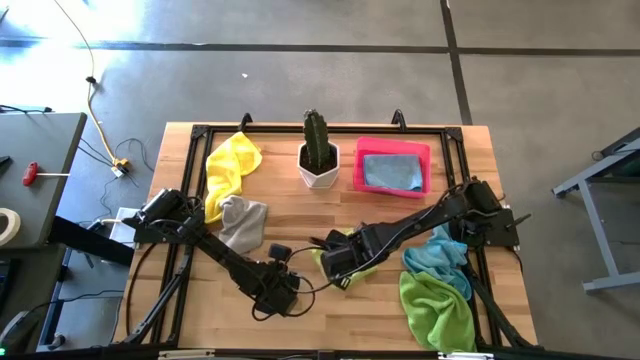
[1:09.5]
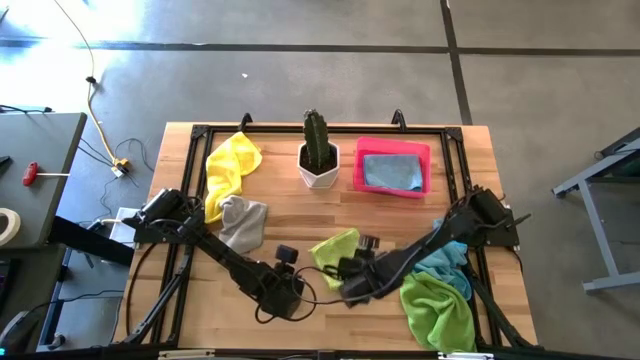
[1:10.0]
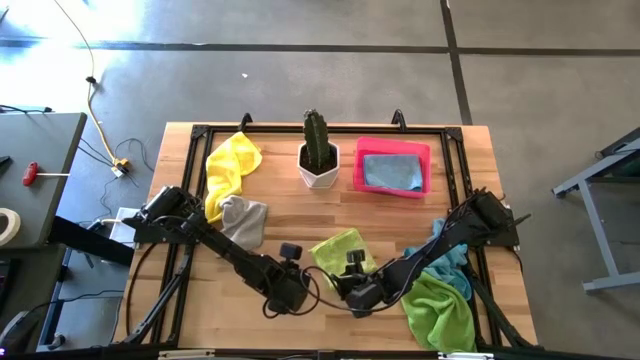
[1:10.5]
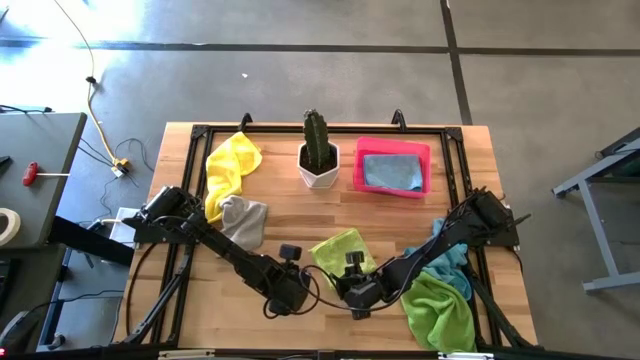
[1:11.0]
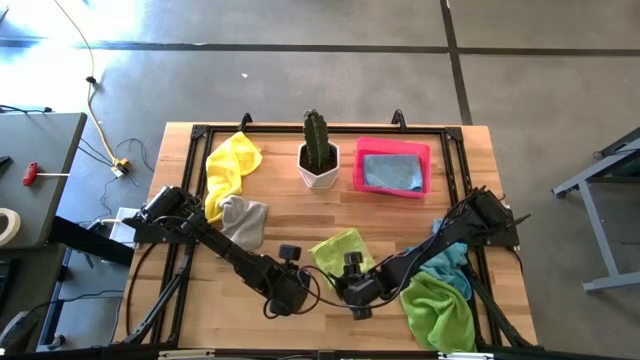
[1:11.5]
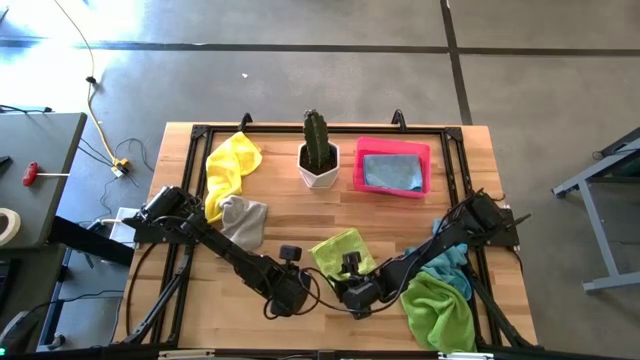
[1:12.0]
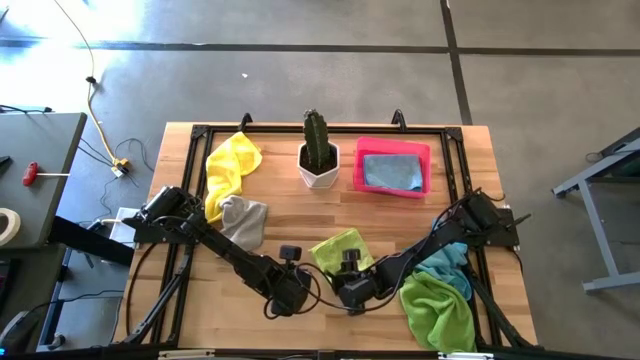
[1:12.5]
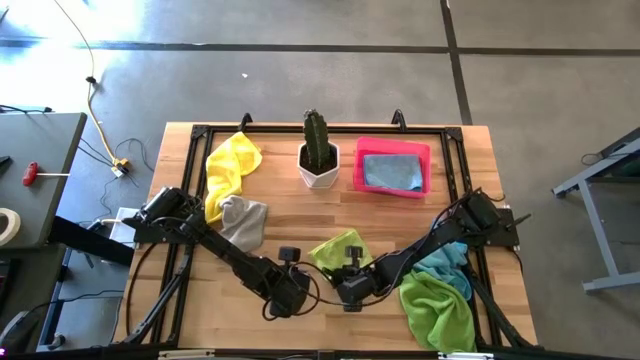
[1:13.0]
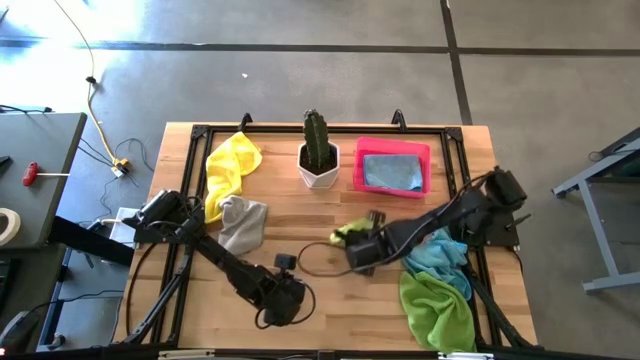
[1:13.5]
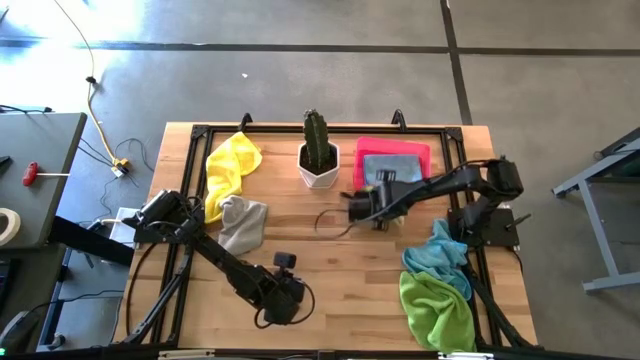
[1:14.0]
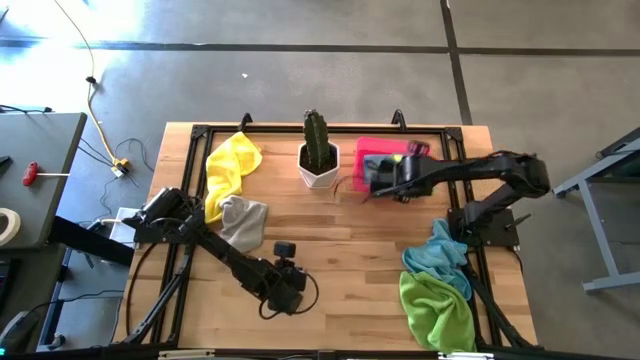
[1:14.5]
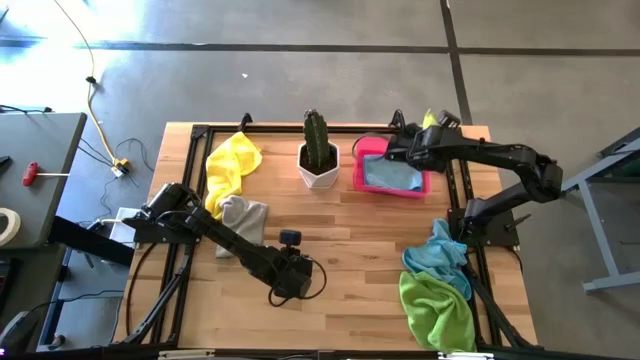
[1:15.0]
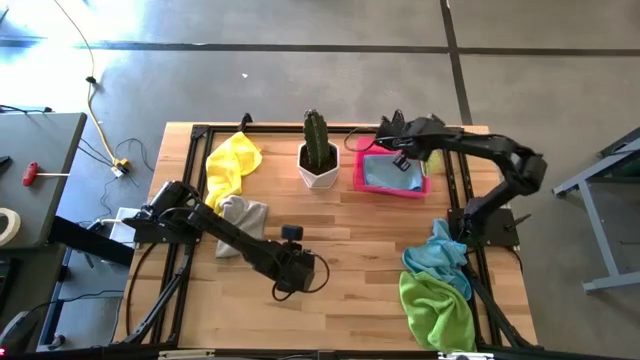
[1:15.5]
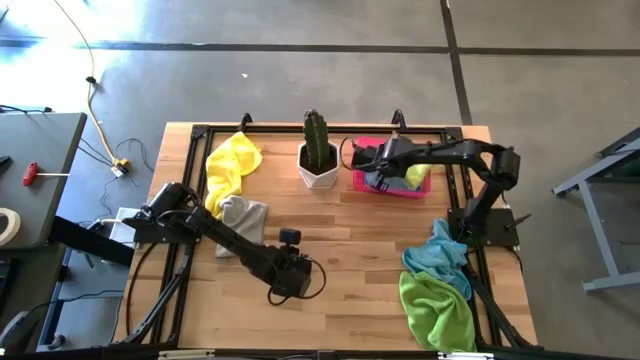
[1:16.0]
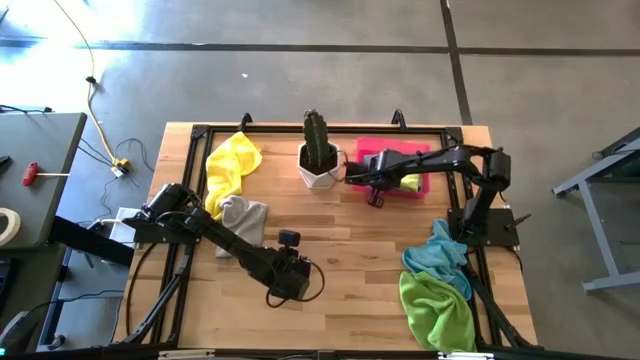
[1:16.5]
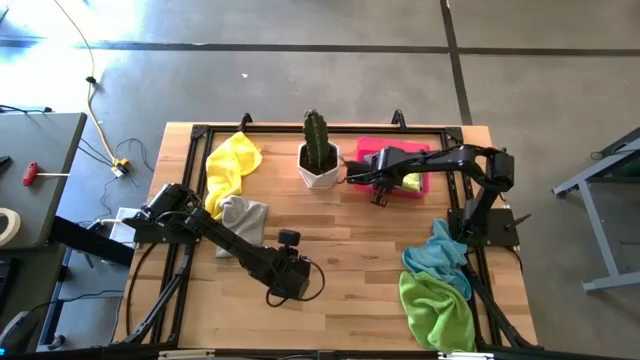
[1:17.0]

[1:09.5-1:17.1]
Task: Fold microfiber towels
Put the yellow green towel into the pink laundry bin

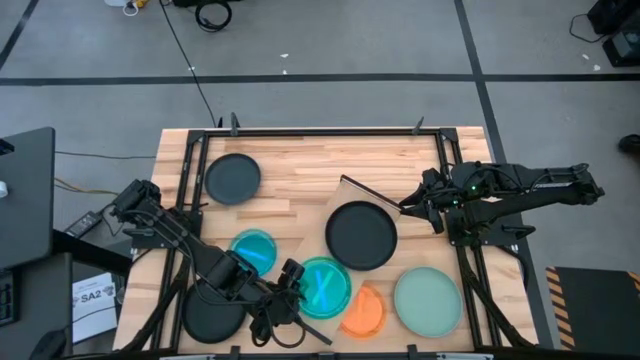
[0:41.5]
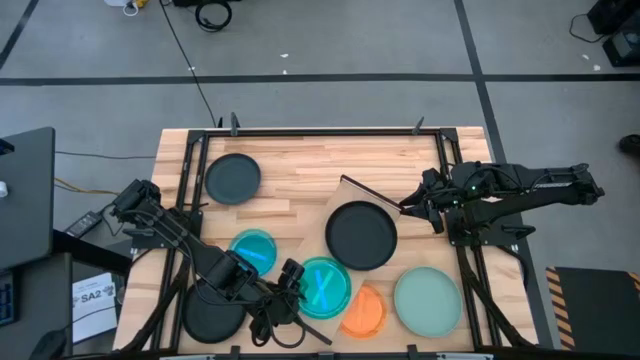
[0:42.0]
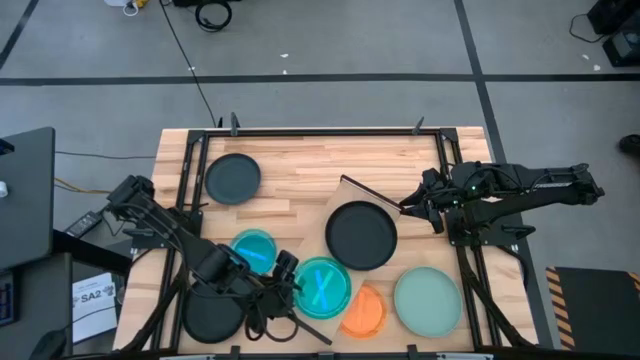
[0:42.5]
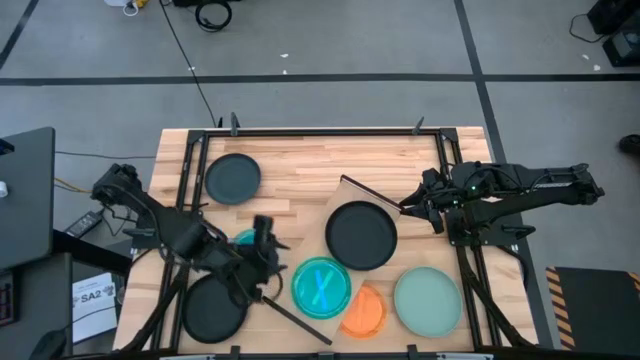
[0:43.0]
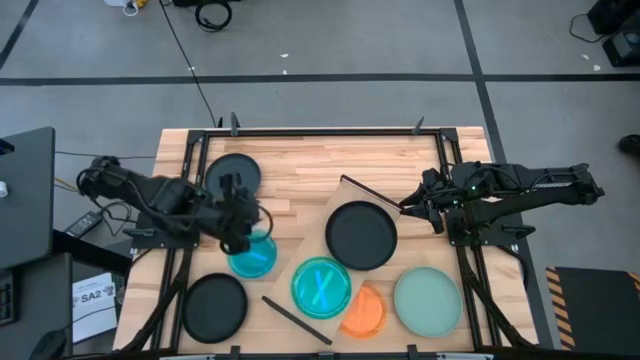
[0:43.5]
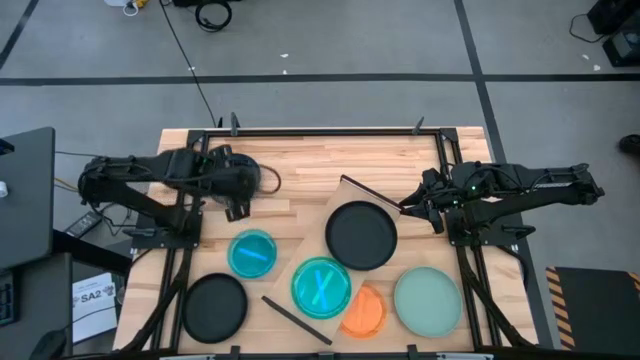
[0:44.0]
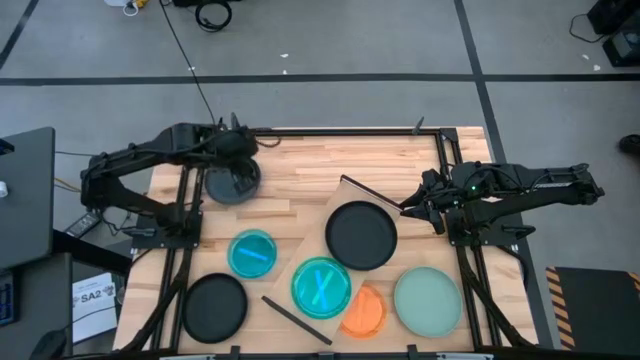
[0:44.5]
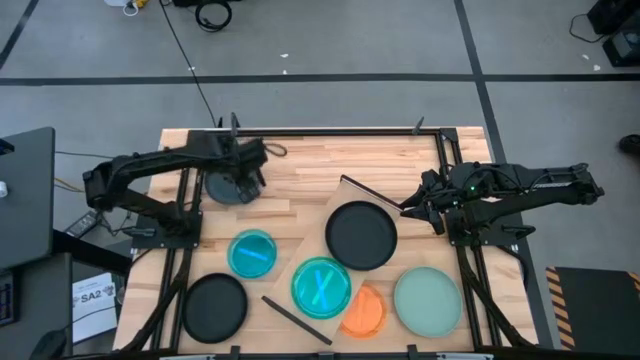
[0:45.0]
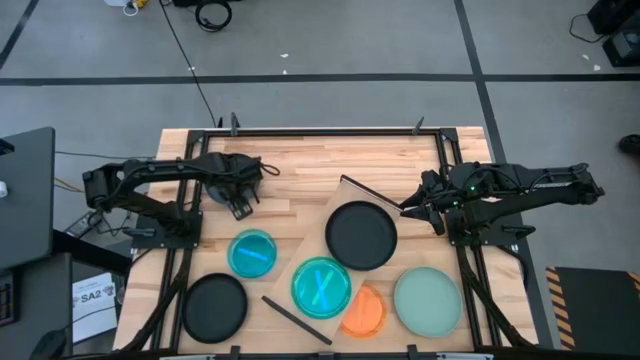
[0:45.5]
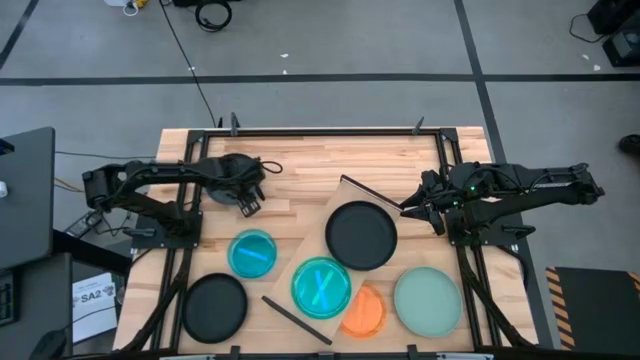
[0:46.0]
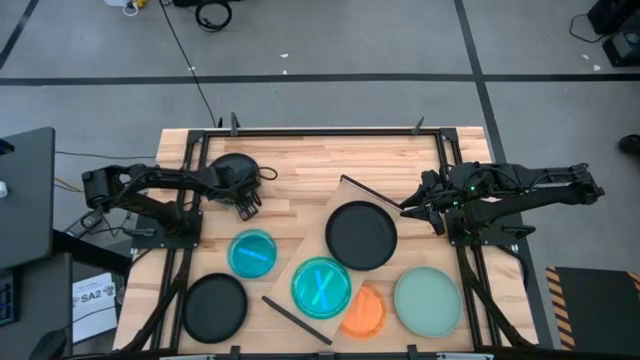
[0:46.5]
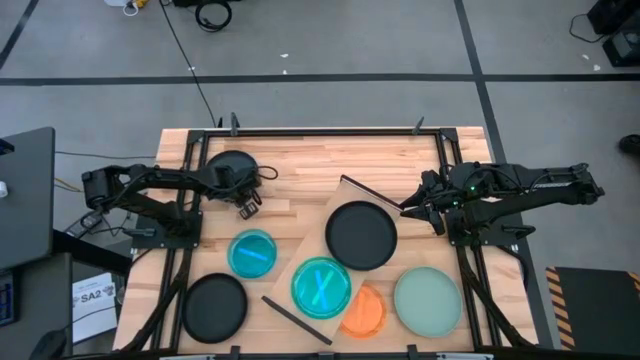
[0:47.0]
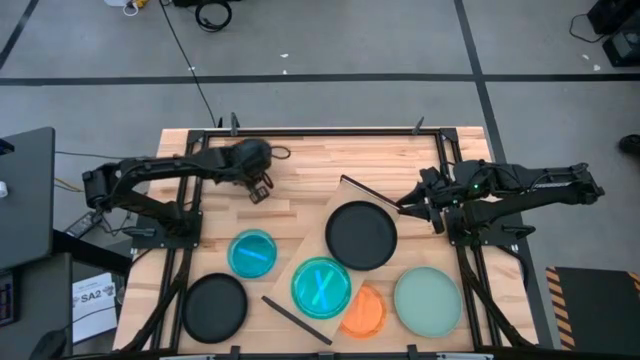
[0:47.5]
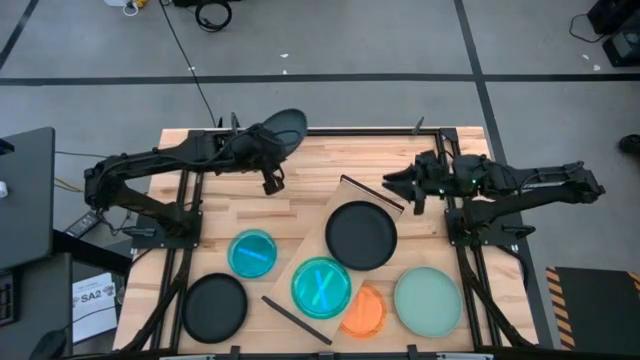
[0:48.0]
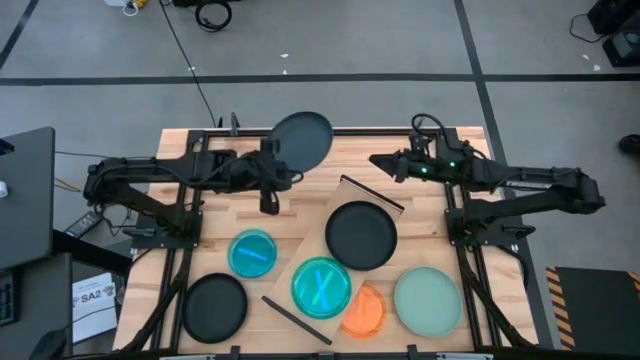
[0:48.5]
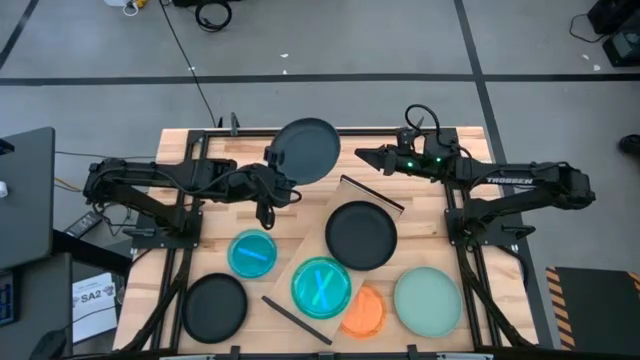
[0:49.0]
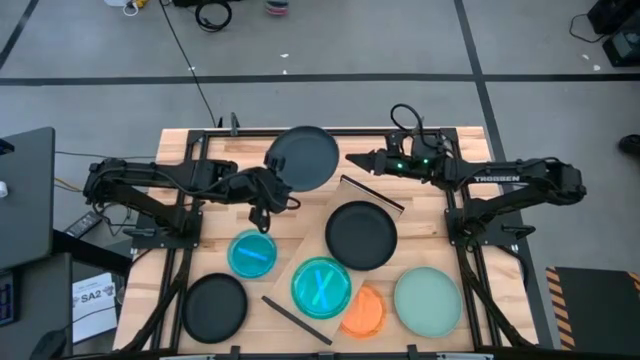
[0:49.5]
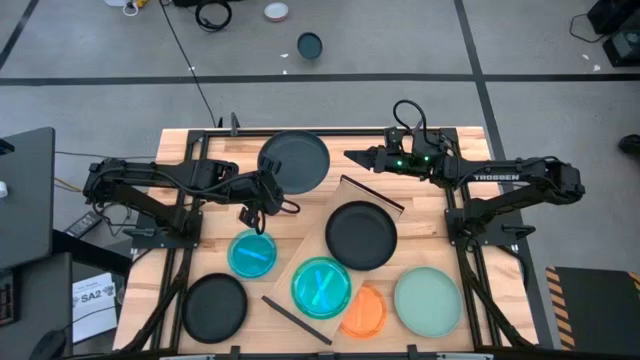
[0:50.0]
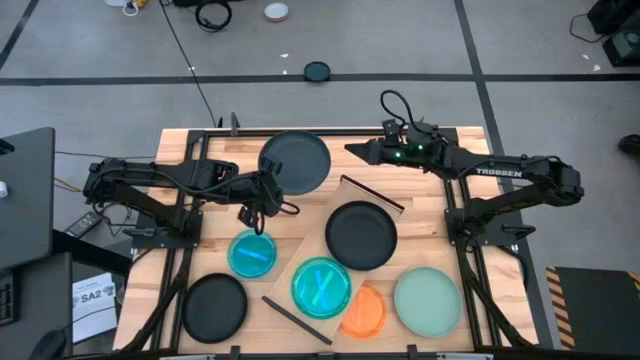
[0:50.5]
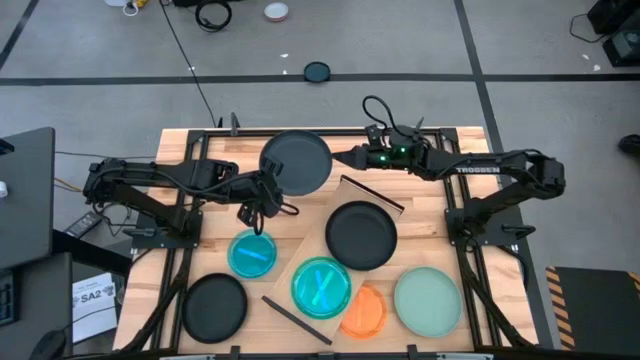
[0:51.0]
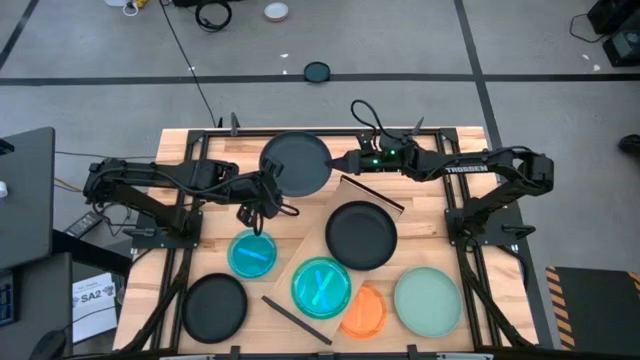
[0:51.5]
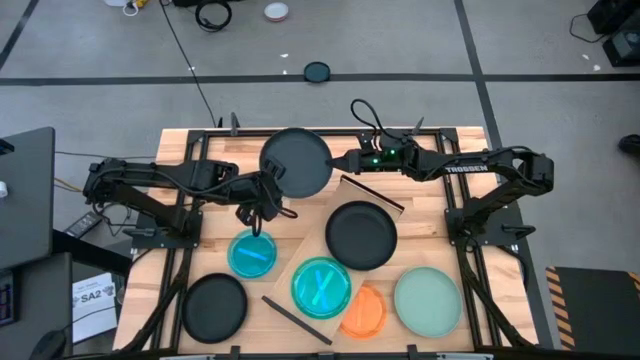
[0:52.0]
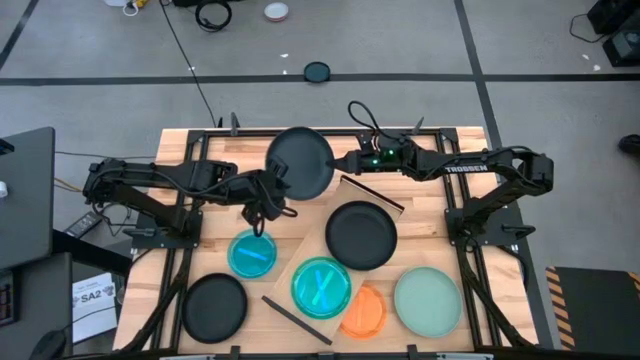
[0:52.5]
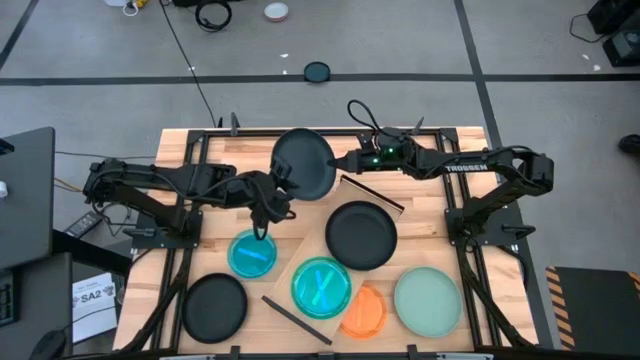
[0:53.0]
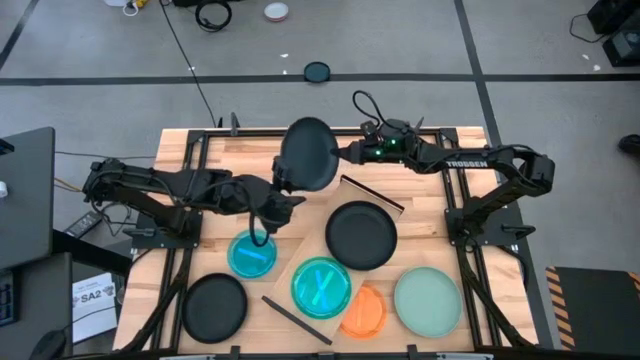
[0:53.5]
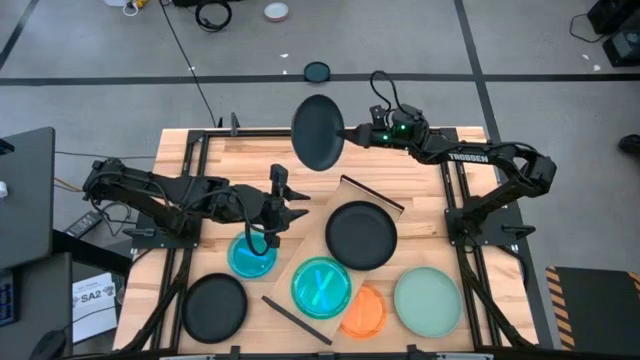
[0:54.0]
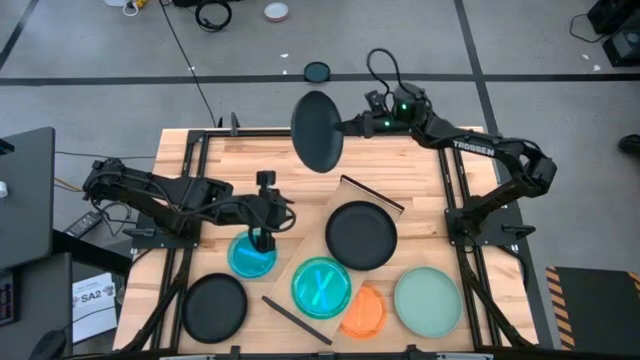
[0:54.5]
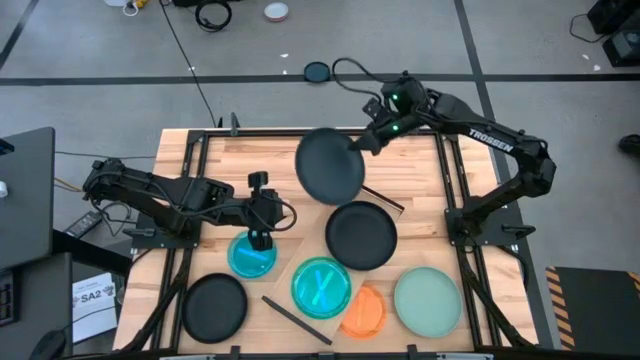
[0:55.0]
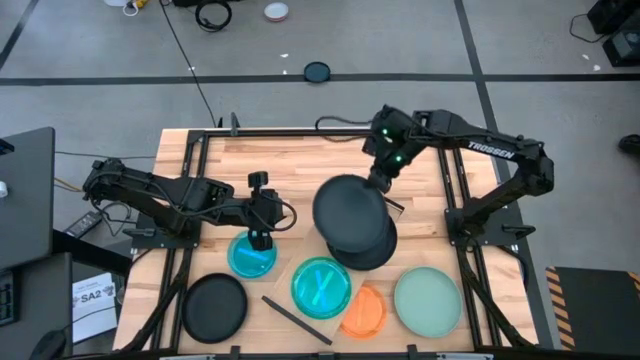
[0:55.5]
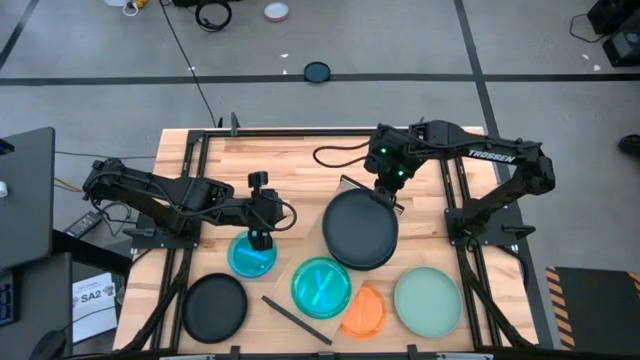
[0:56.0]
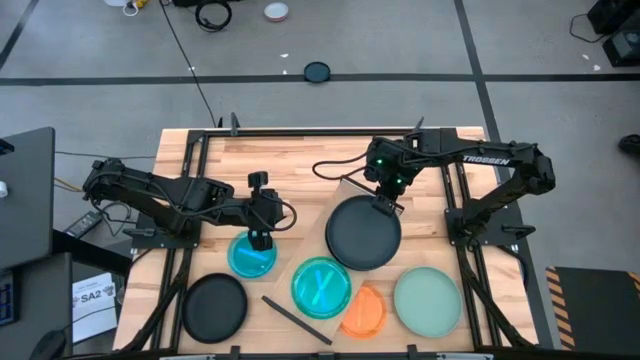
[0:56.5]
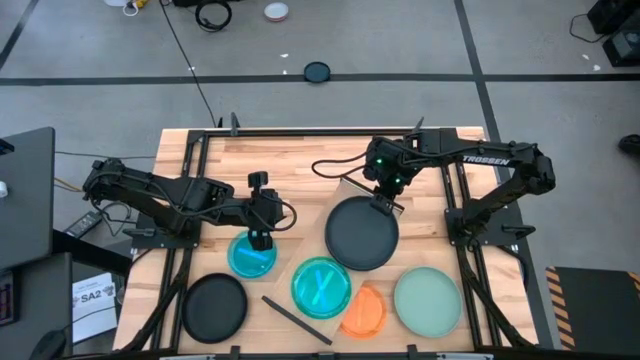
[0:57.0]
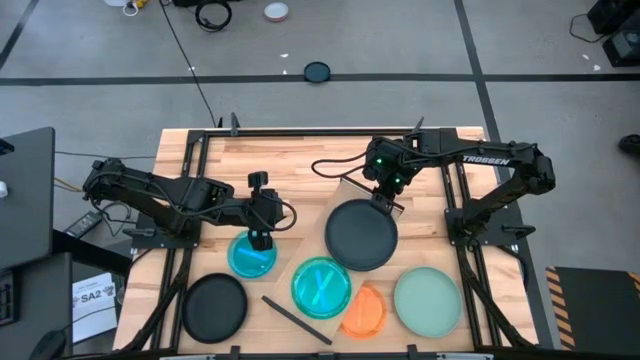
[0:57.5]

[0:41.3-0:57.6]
Task: Place and stack plates onto a shelf
Stack the top black plate on top of the black plate on the shelf
